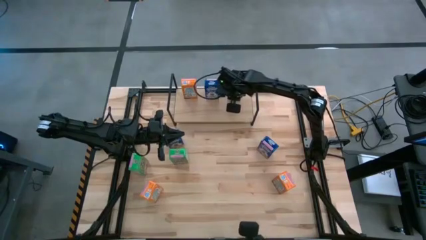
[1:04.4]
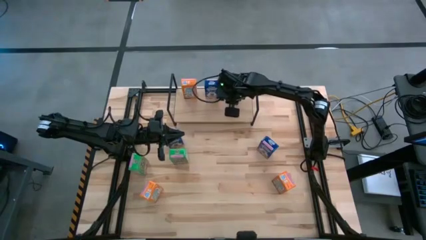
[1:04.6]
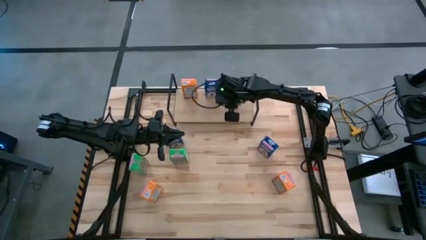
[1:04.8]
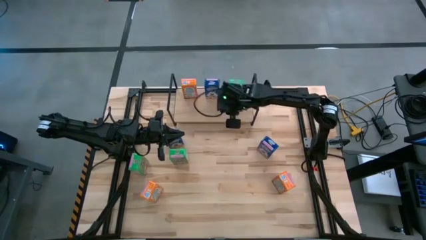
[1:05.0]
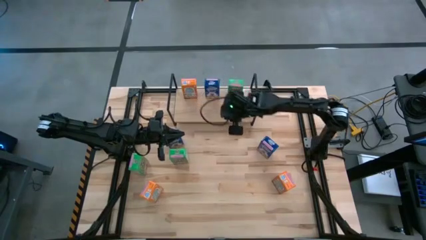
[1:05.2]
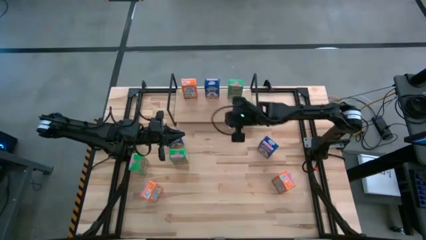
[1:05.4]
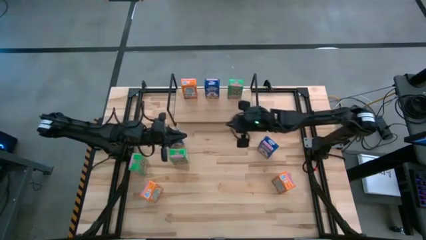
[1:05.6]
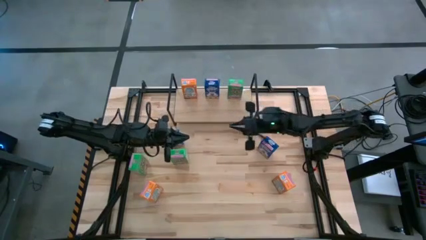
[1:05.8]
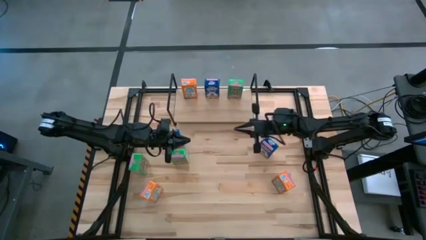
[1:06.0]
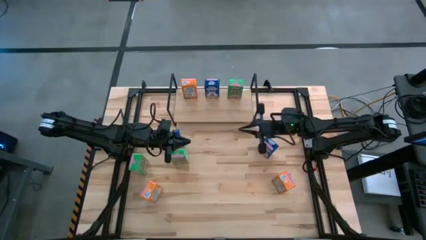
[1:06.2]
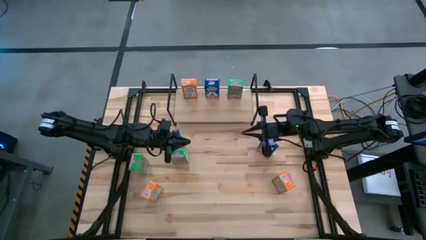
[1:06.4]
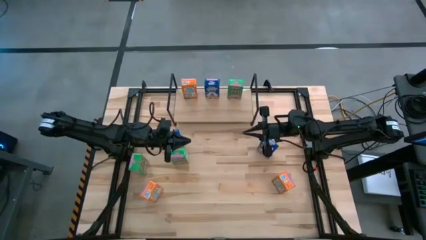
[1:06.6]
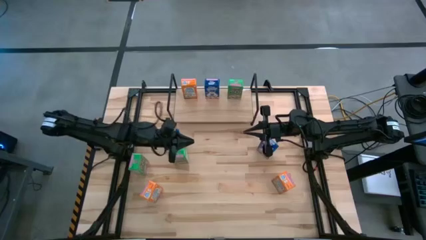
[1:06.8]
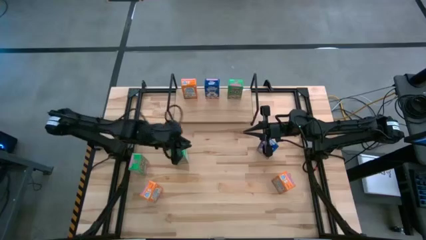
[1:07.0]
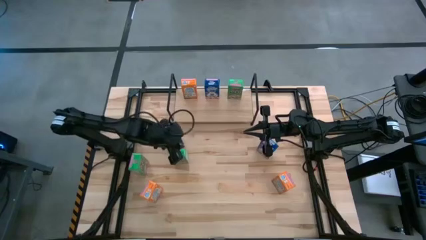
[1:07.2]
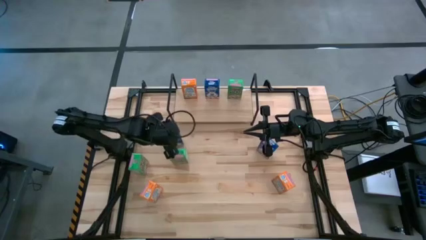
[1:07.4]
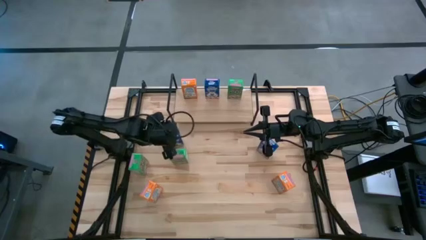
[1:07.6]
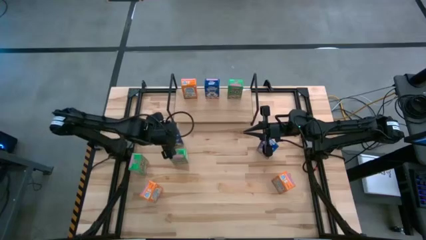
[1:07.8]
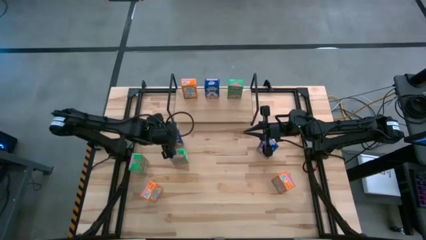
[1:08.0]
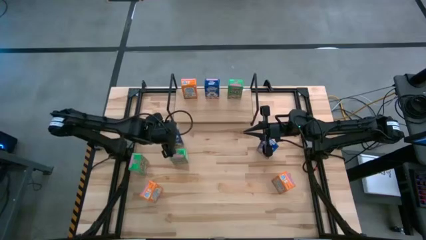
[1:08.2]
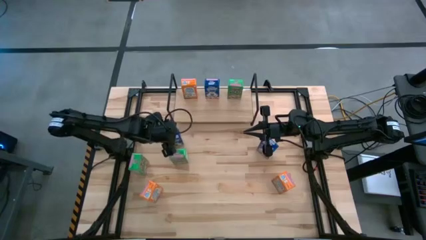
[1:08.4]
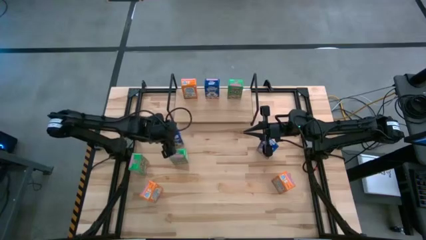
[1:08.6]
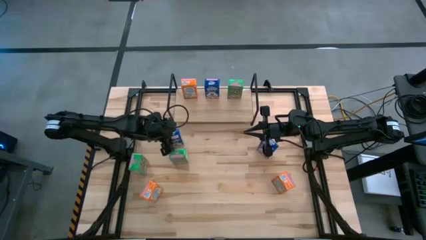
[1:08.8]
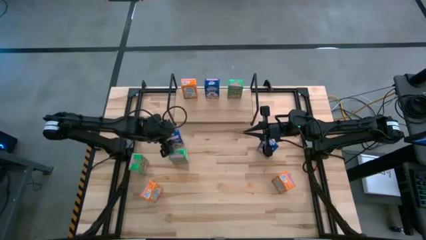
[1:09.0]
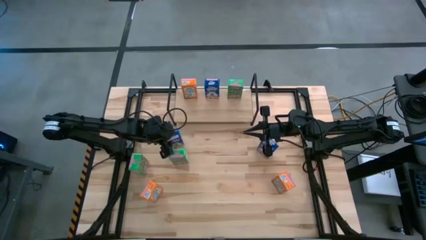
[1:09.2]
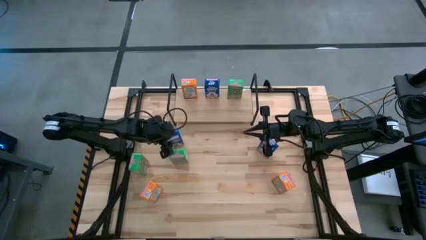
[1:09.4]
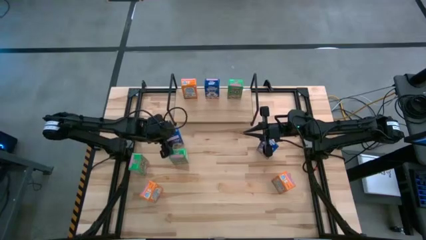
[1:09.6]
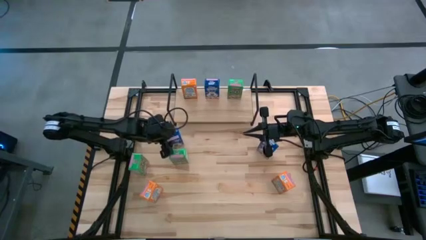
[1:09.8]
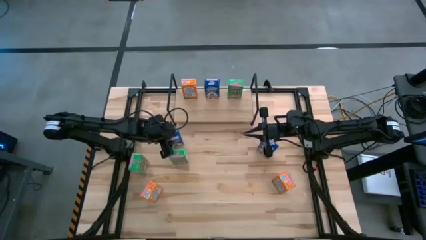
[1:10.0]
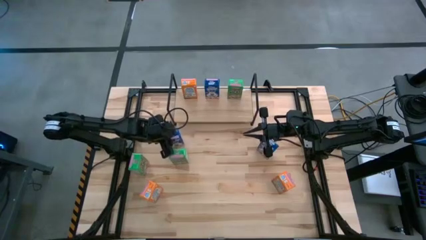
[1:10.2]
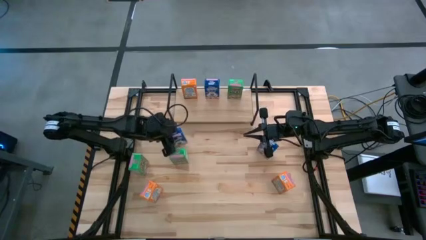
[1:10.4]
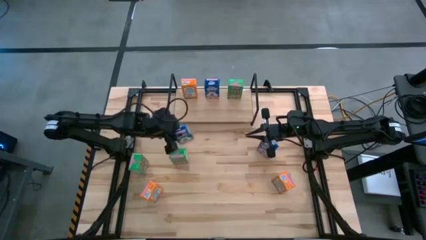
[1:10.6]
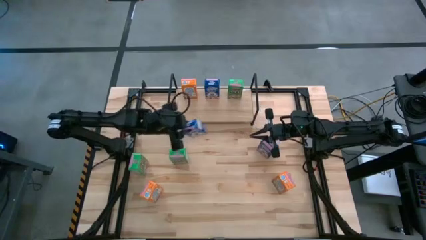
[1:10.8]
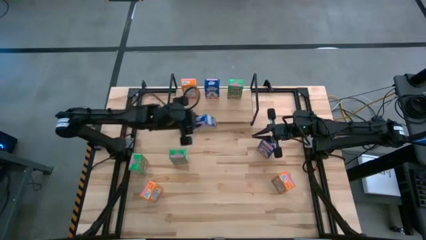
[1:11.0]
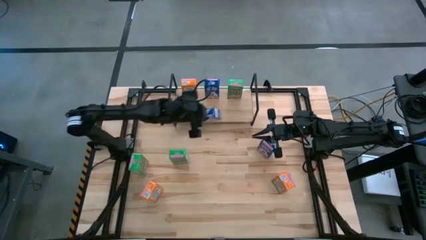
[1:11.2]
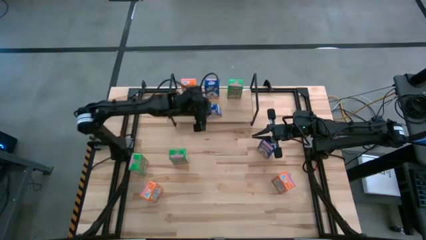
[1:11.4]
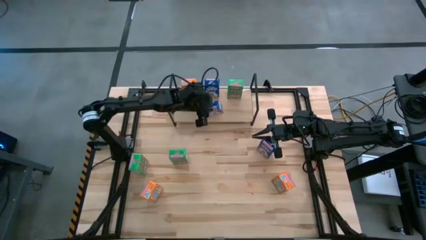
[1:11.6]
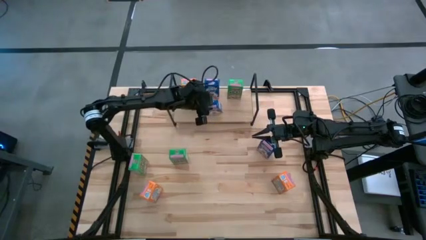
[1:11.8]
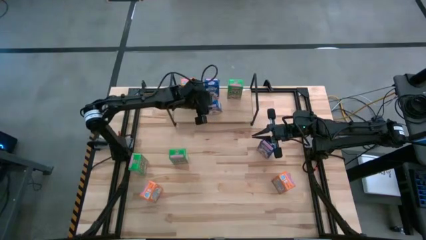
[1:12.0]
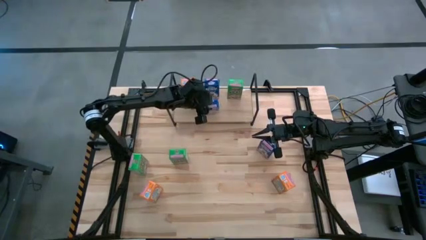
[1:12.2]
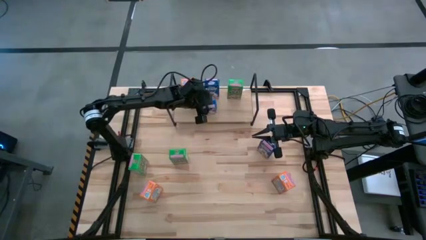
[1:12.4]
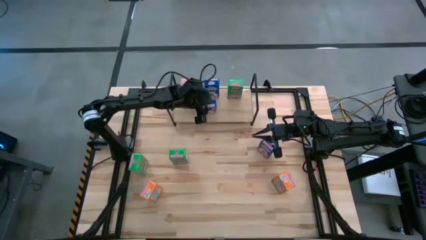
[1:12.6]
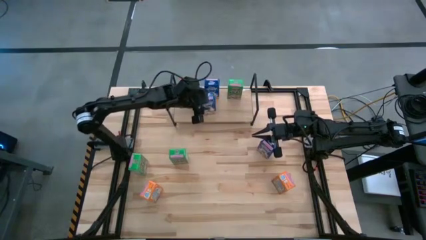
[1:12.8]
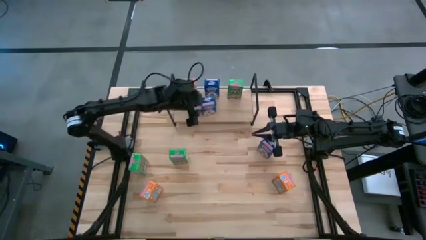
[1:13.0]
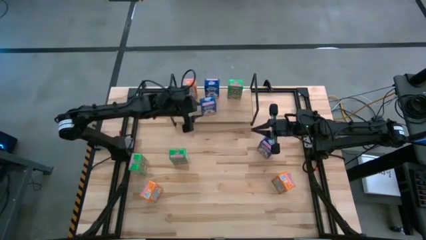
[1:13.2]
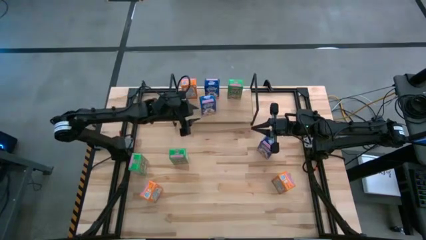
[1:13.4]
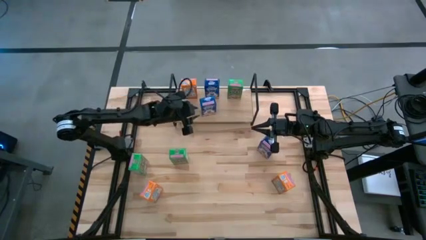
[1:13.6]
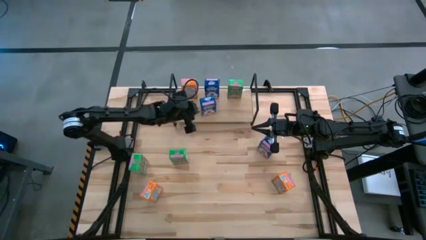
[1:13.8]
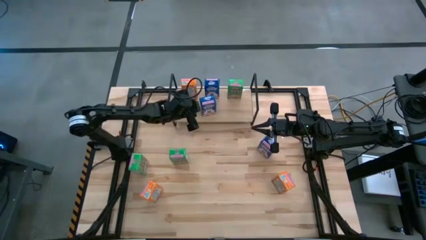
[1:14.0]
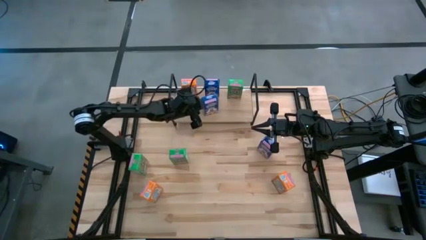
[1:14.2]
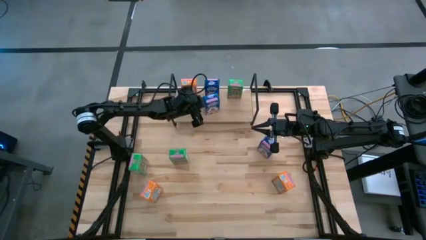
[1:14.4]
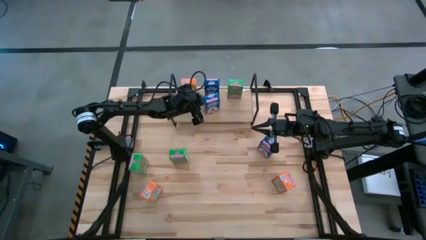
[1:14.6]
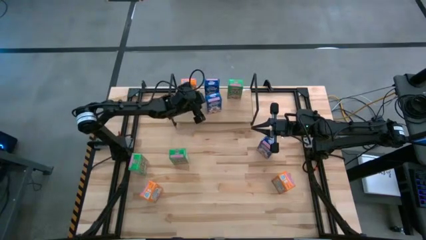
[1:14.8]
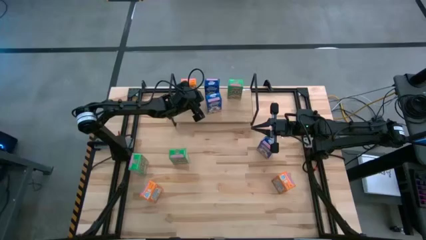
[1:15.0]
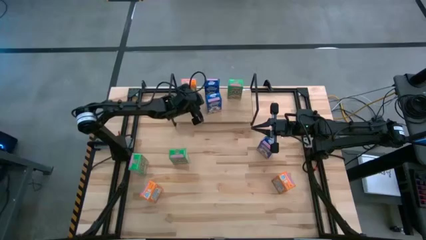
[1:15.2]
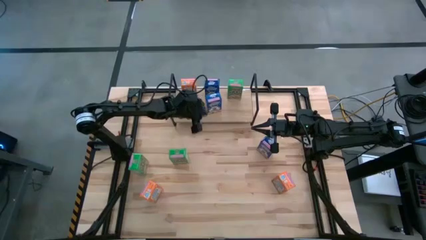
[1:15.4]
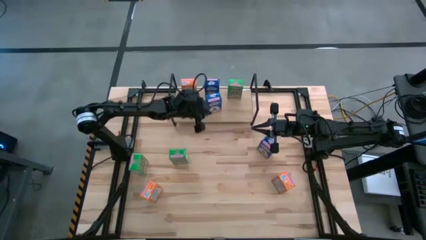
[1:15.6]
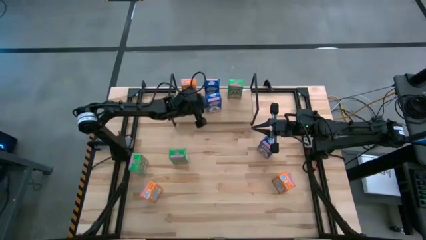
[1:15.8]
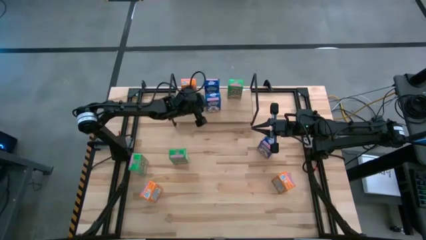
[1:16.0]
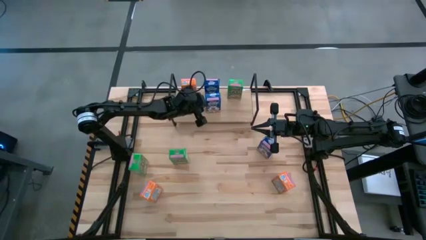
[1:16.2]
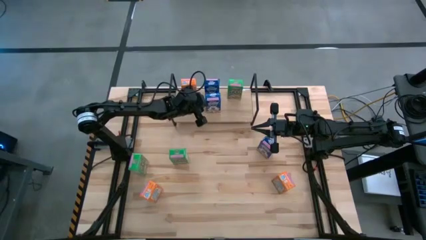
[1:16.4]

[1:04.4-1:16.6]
Task: Stack cereal on shelf
Put the left blue cereal box on the shelf

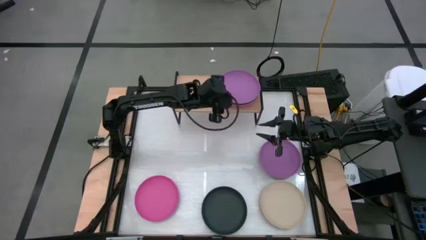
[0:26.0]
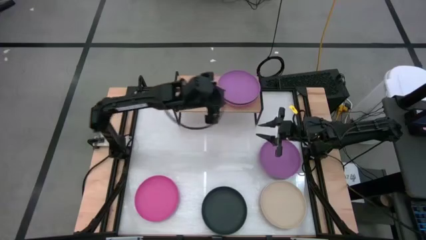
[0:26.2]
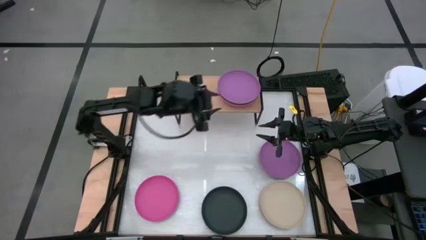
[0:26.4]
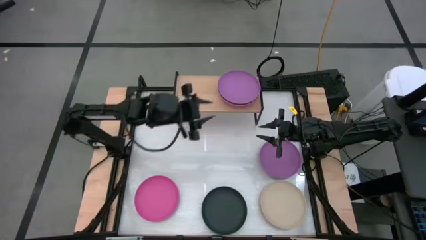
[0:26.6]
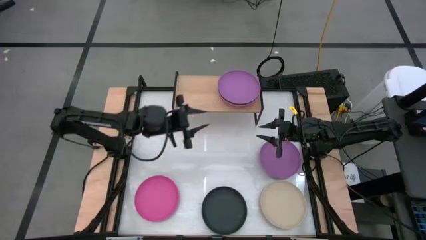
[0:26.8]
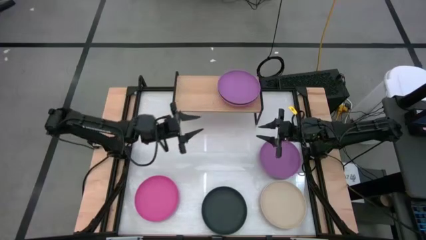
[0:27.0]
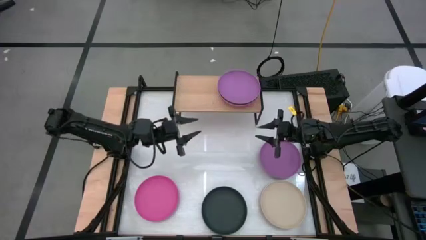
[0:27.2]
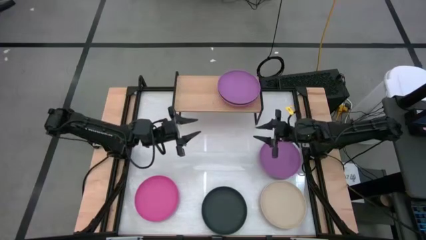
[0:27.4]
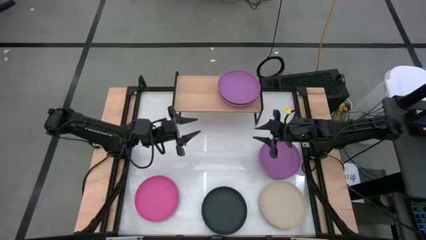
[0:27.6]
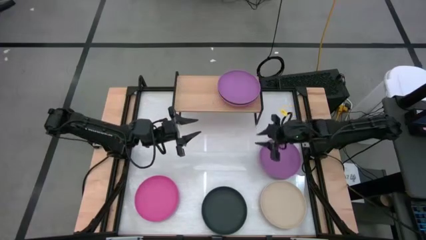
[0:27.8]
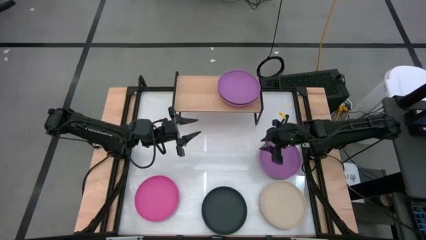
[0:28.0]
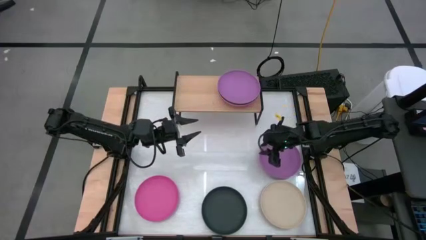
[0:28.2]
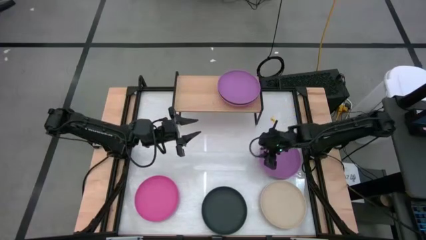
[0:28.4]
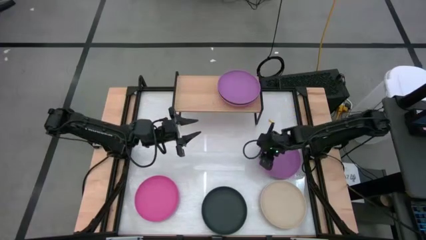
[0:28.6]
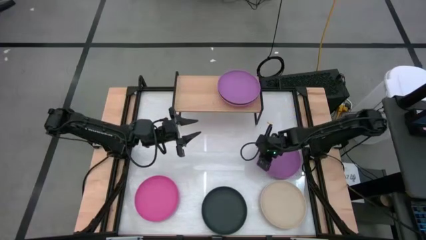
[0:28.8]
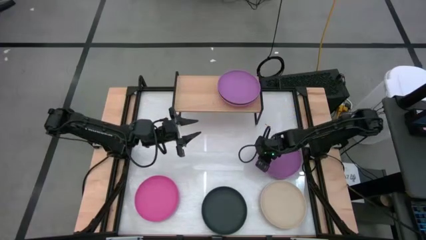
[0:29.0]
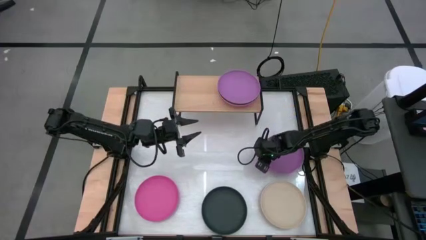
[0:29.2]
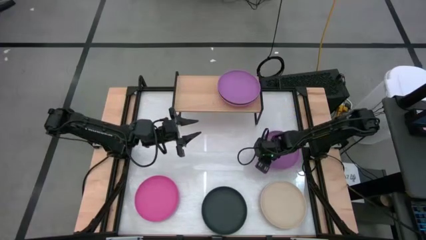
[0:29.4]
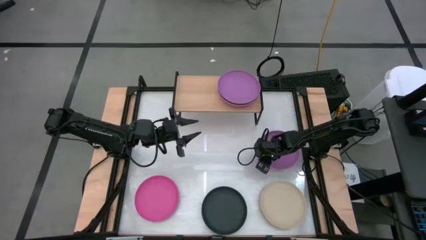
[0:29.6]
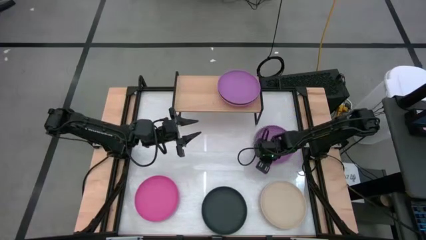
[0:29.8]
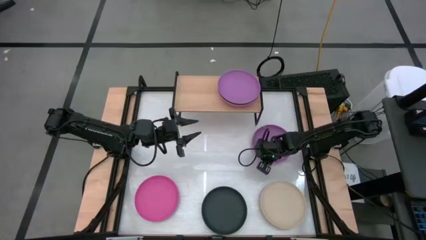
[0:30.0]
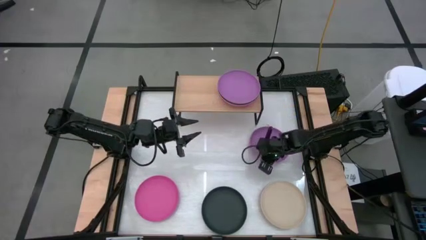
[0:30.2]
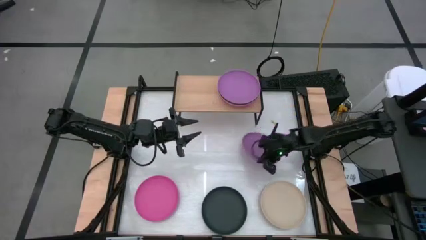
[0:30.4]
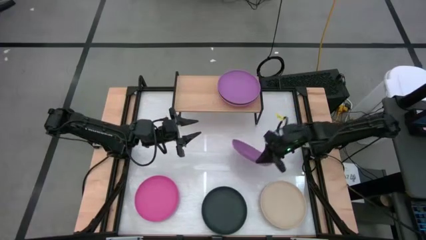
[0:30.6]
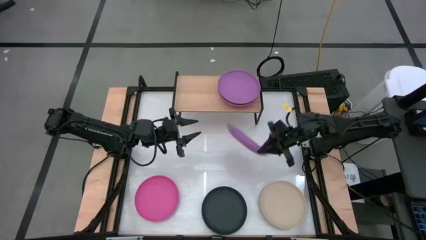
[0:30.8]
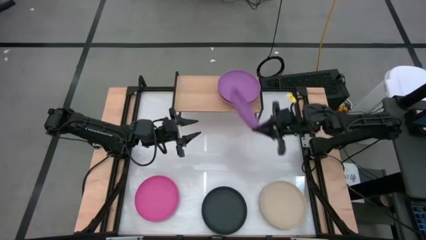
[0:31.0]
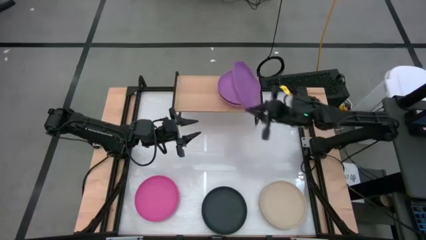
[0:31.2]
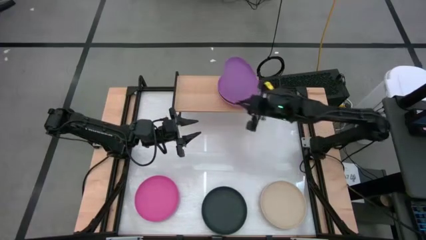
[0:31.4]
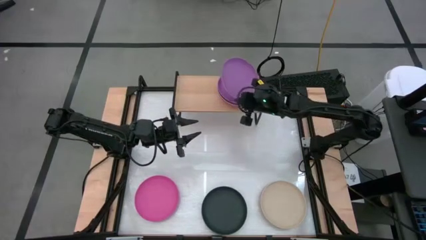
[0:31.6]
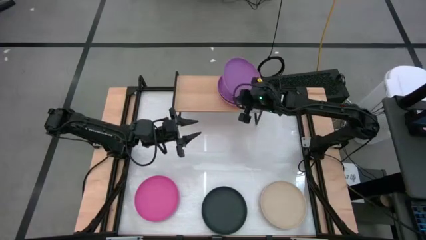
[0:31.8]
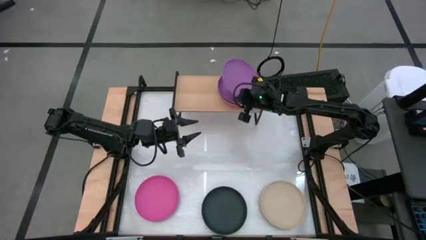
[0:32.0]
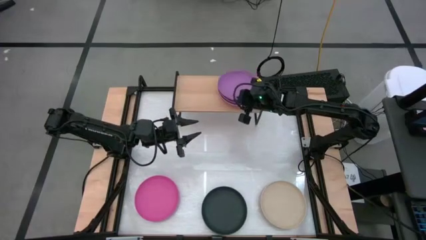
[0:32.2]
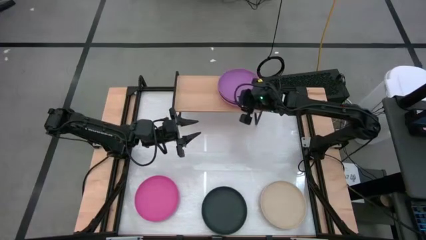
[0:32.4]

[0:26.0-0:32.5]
Task: Place and stack plates onto a shelf
Stack the purple plate on top of the purple plate on the shelf
